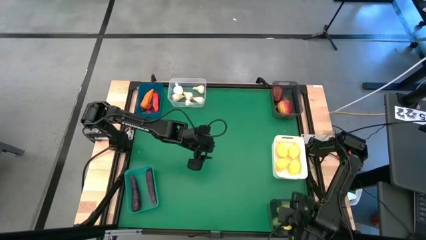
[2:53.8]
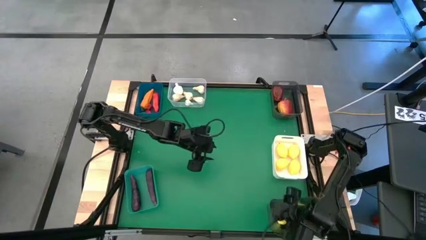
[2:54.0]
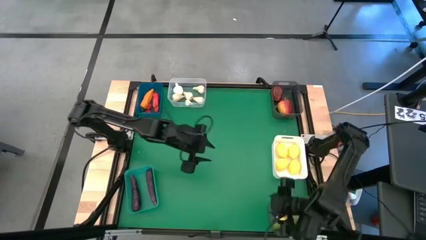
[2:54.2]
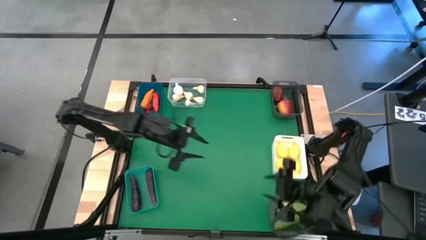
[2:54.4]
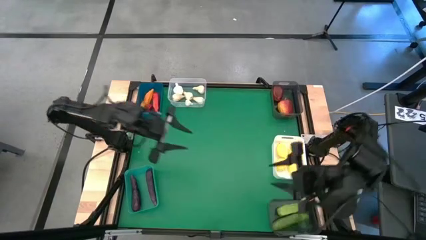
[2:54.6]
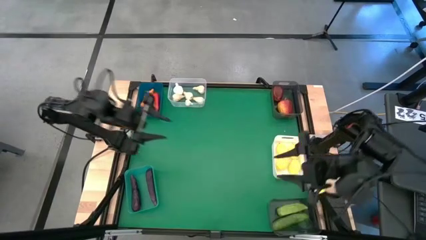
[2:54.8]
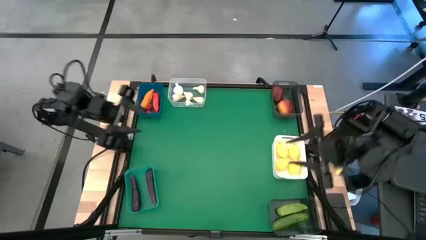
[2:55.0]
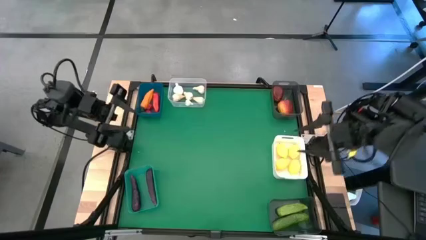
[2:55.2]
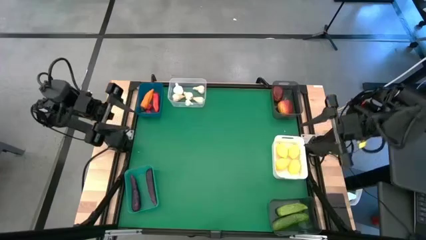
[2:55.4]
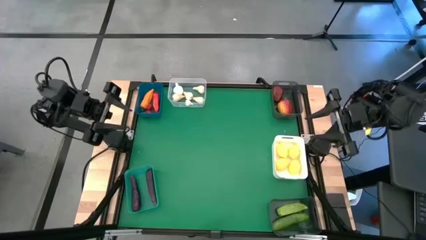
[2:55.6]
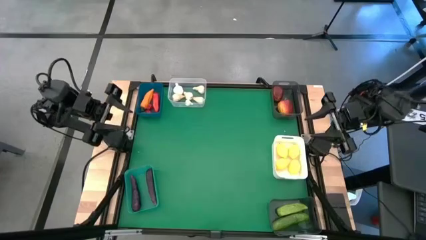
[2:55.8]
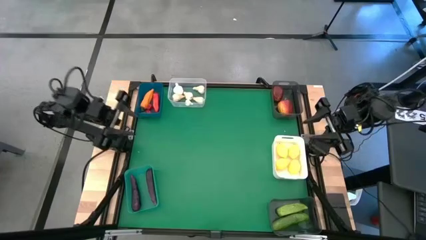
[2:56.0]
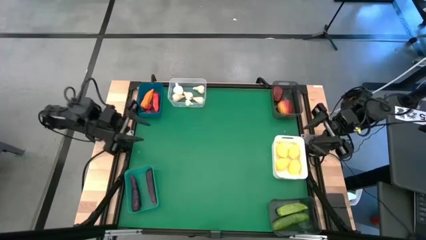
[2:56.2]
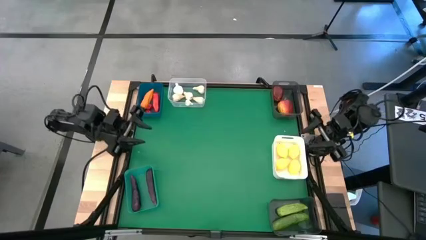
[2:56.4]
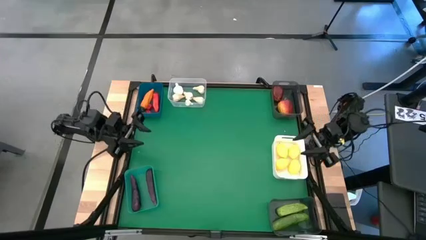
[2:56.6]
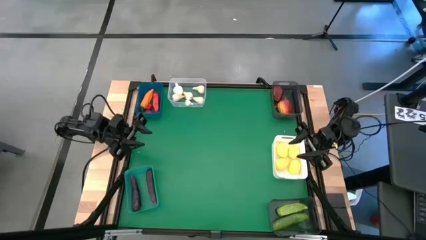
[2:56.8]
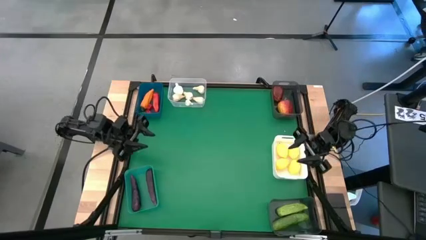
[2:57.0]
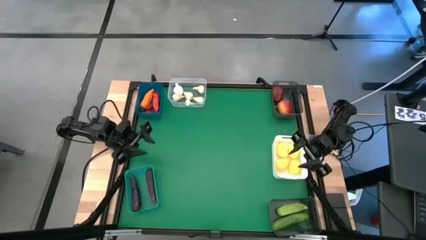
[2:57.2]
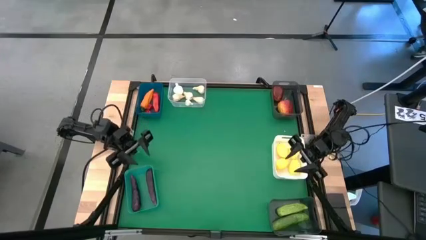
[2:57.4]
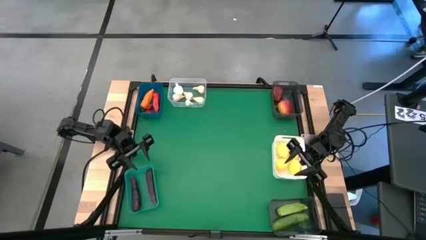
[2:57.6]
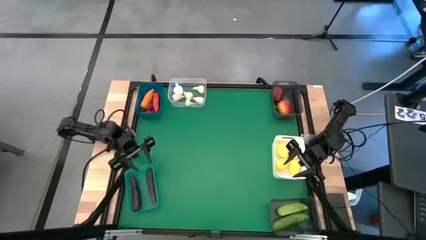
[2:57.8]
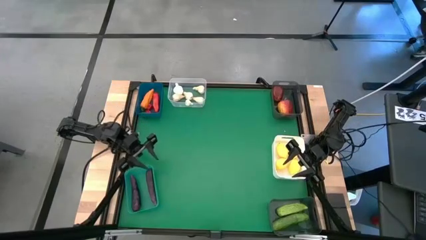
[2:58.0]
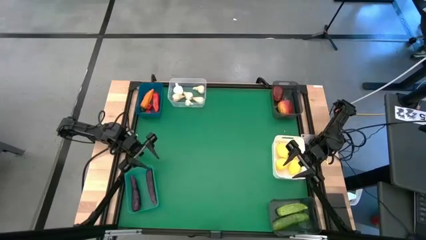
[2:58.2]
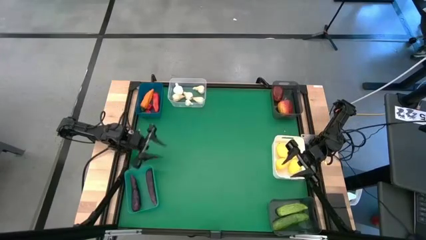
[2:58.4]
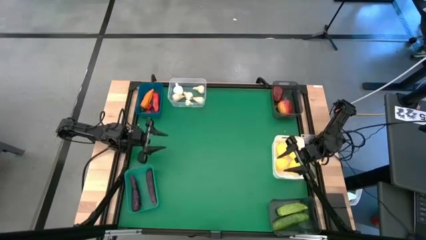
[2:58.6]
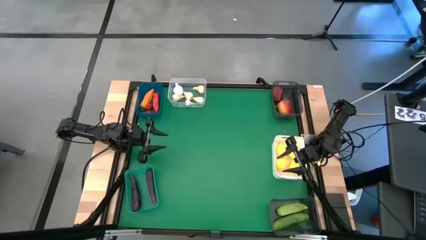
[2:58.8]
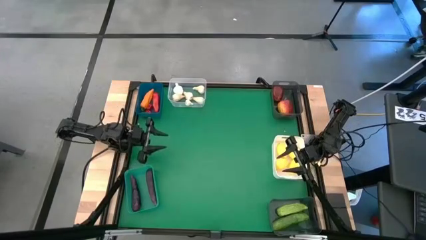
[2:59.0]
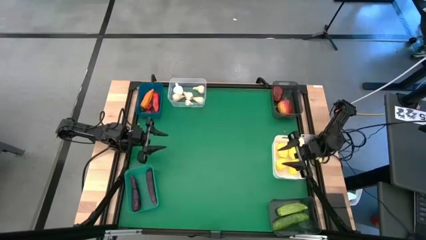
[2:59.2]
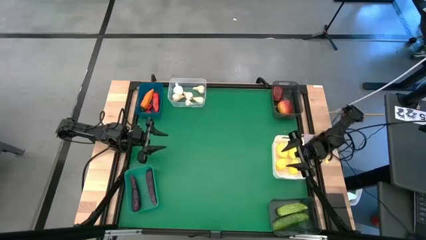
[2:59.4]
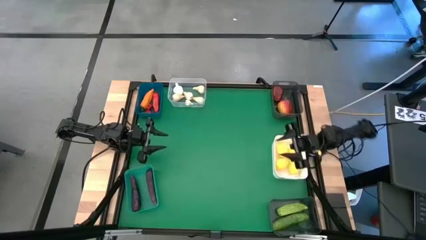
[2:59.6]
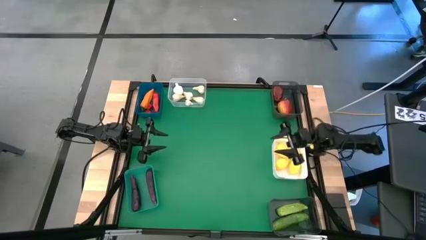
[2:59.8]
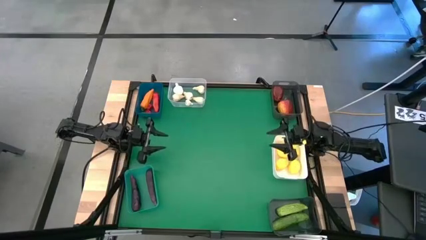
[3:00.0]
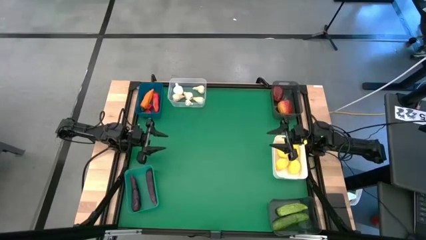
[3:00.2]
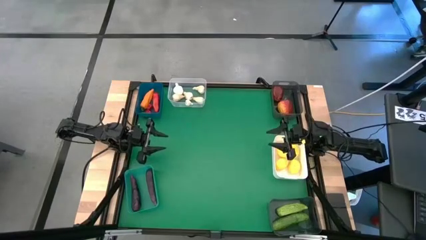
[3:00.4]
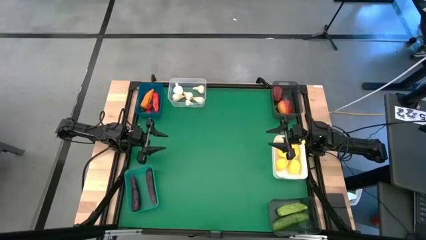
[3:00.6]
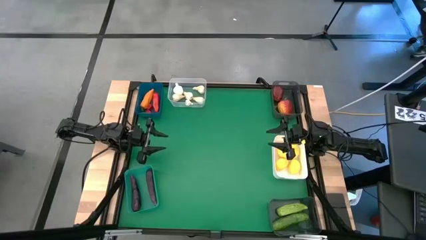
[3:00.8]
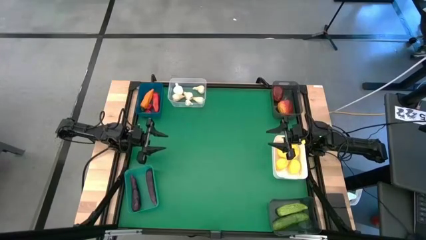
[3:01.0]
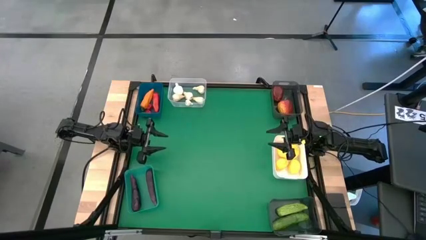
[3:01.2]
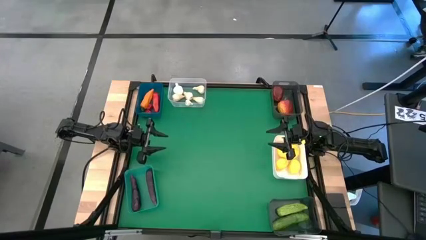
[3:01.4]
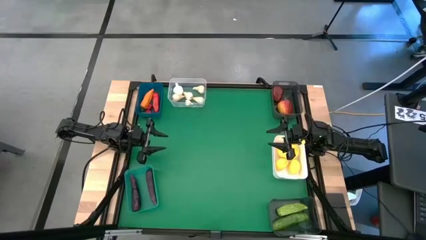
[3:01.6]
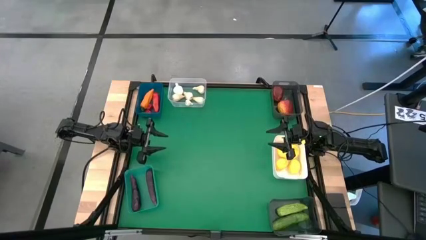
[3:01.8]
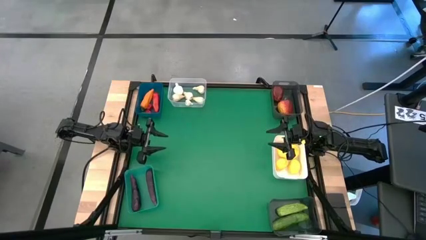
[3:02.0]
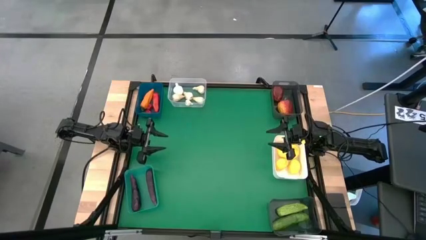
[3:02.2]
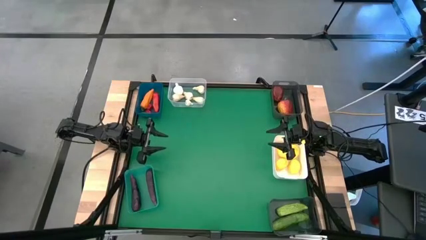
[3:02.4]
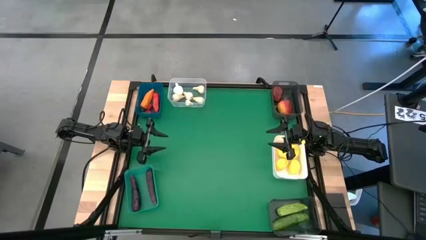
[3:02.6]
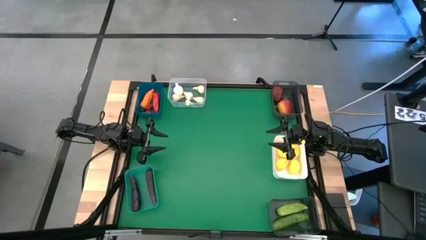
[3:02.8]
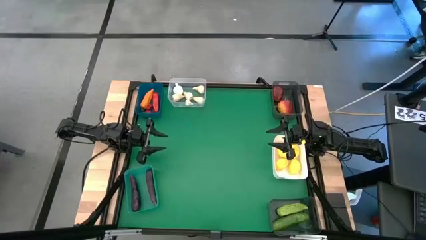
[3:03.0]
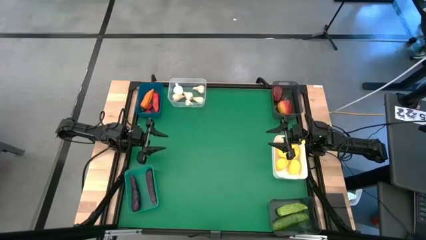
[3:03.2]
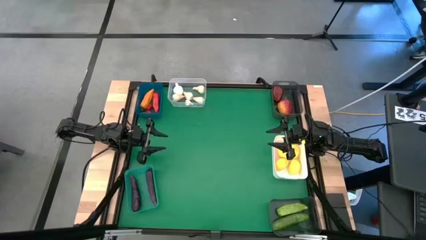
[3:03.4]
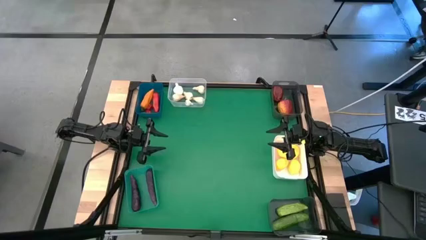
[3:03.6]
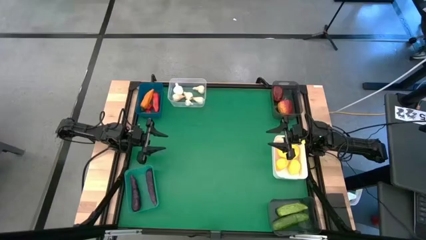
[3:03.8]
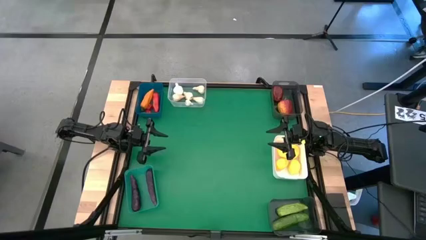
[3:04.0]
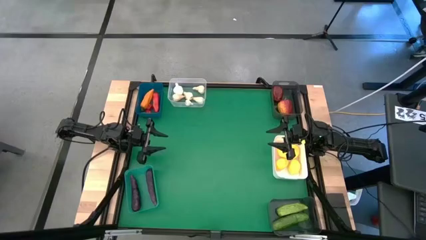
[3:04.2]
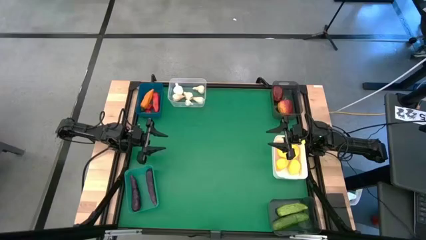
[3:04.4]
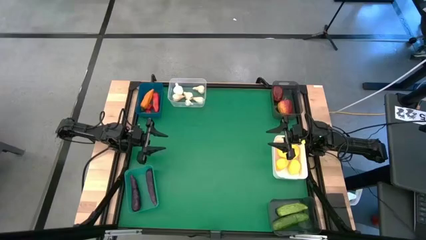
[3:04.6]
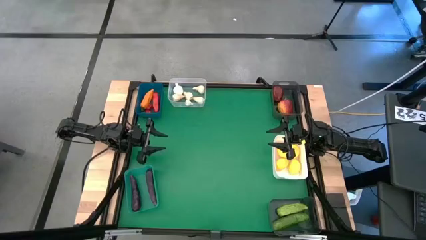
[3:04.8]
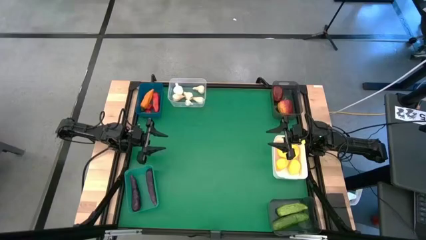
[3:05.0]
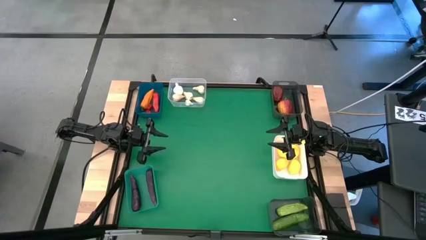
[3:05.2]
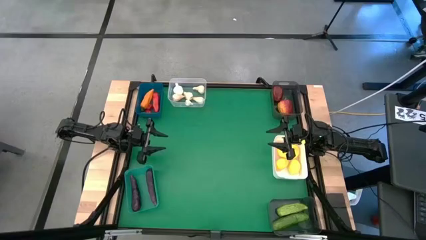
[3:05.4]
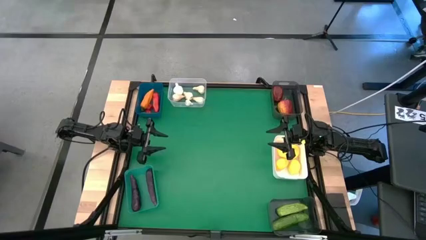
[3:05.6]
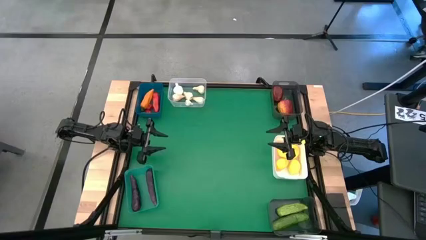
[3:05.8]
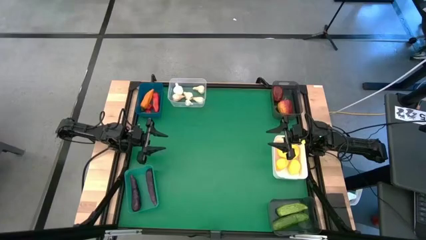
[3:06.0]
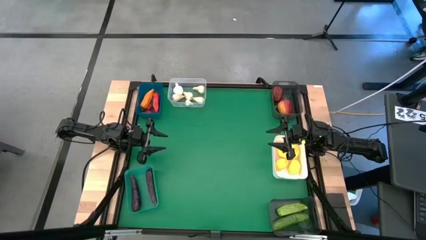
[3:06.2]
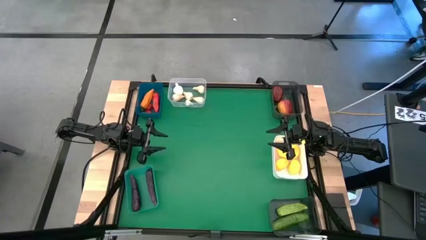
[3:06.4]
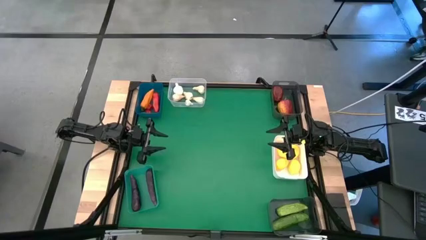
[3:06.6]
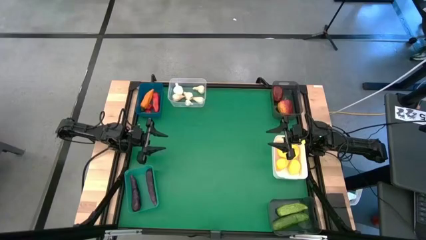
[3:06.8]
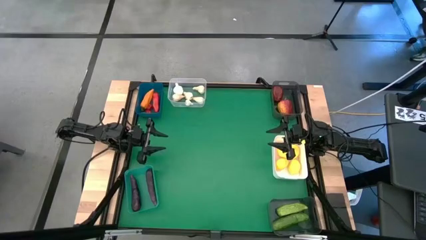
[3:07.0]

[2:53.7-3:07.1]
Task: Sort produce into baskets
Return to Home Position

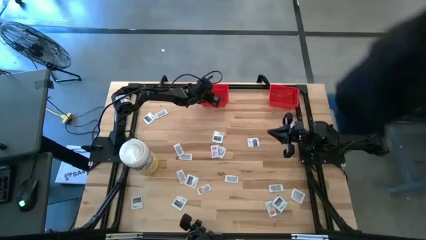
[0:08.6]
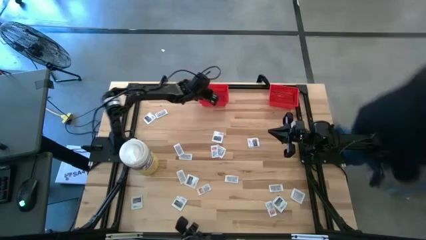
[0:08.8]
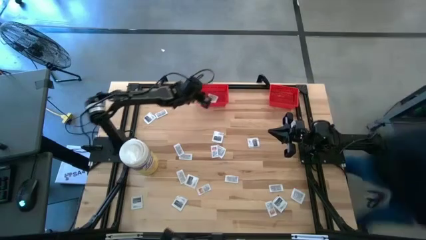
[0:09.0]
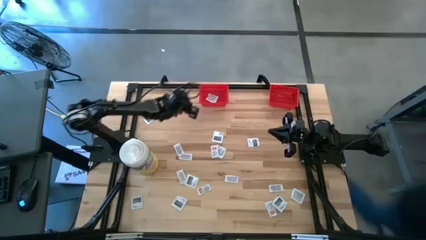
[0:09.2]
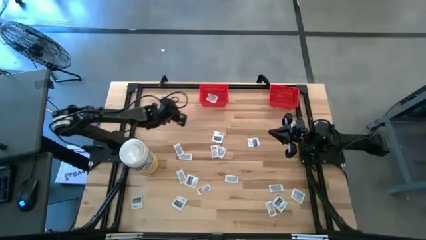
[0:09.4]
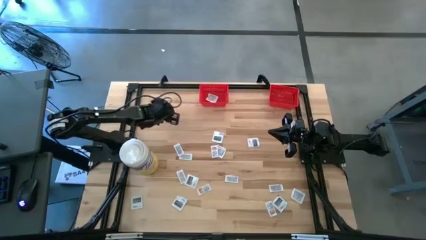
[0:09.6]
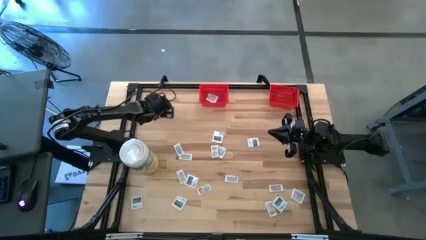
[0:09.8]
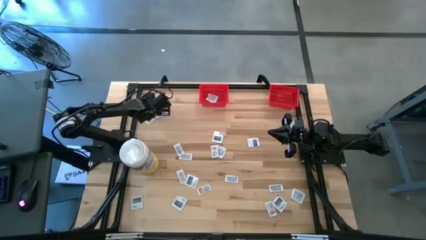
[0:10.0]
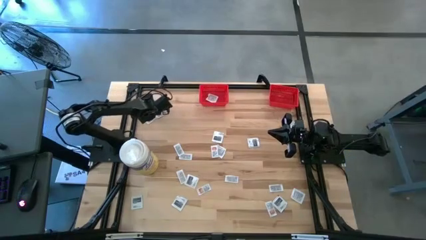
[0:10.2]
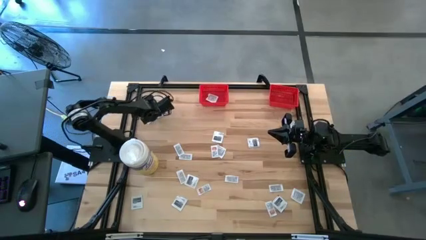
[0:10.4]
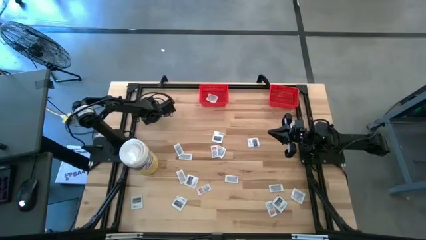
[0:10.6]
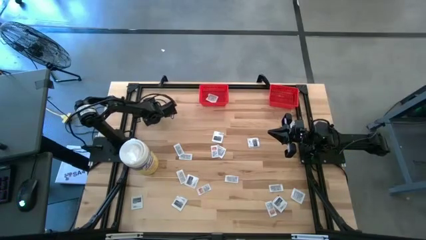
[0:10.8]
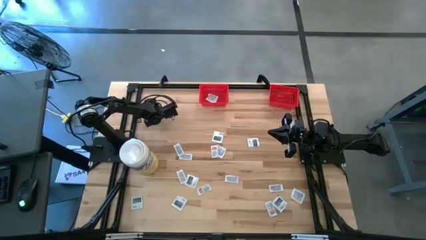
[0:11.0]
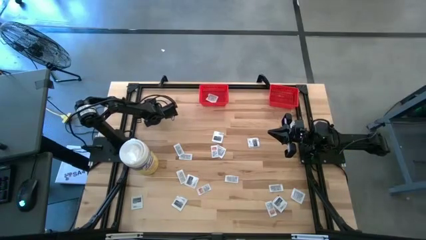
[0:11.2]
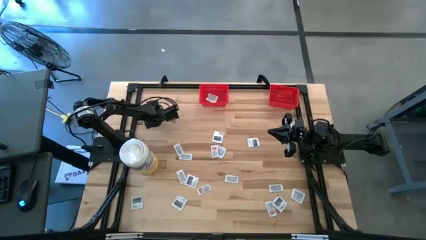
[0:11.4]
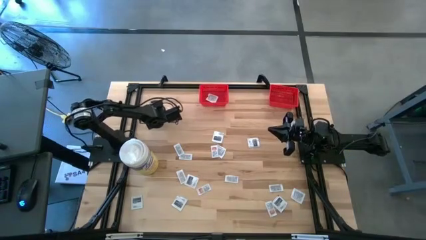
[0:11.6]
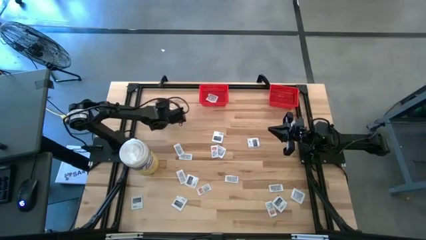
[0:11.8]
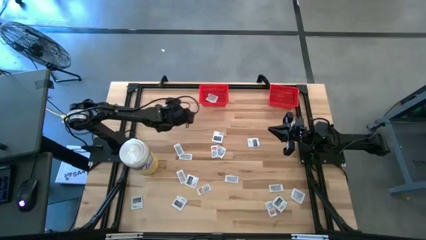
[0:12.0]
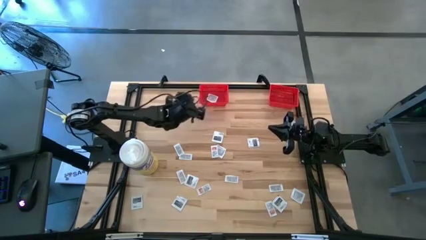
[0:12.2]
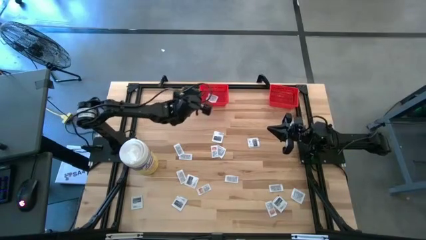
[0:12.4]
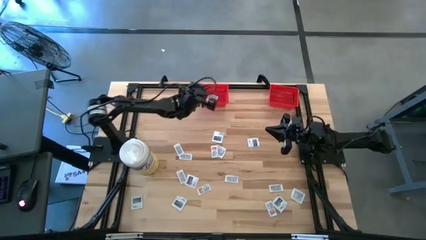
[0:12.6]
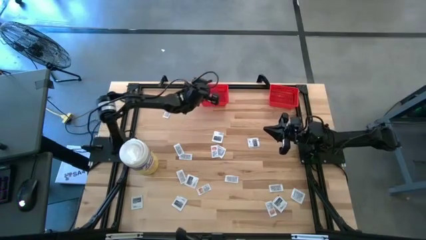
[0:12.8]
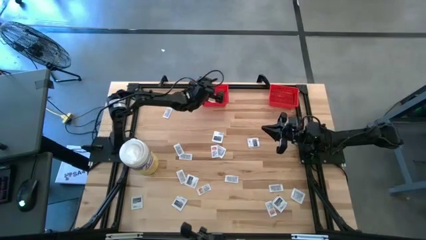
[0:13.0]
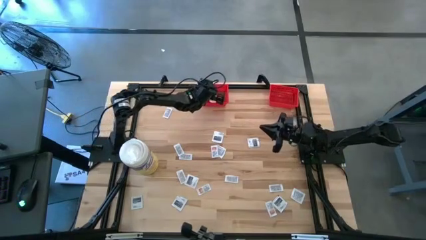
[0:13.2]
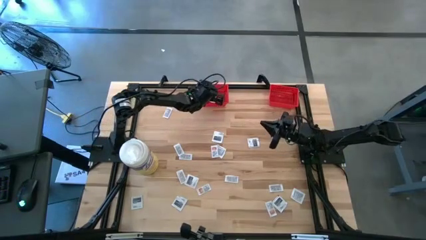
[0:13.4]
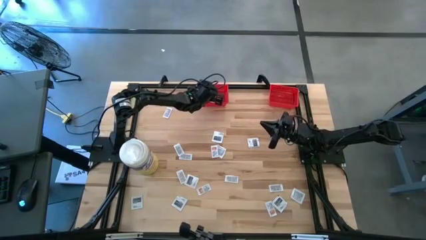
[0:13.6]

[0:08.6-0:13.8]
Task: Pick & Place First Aid Supplies
Put the towelette pack into the left red bin
